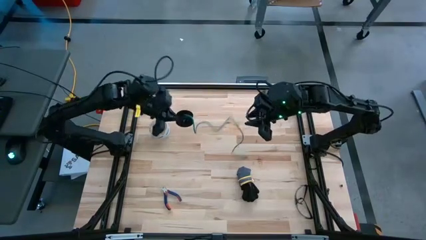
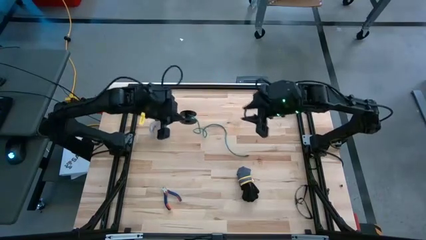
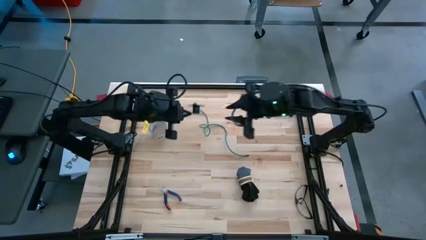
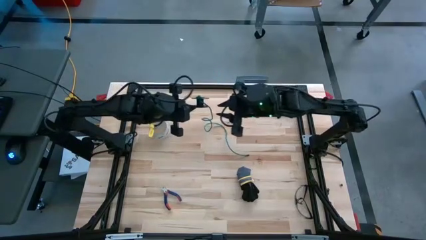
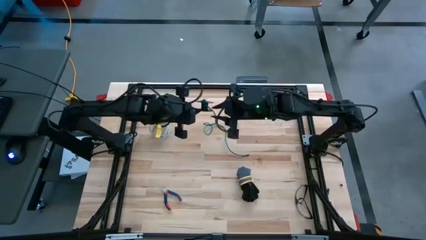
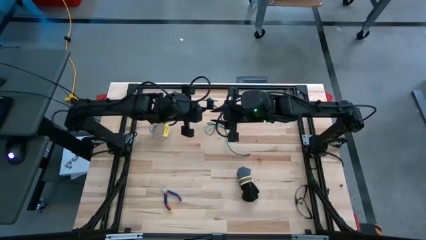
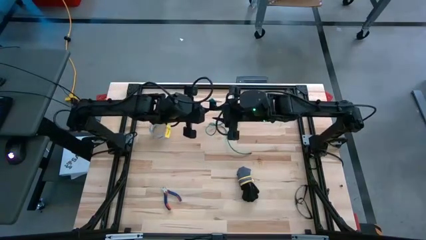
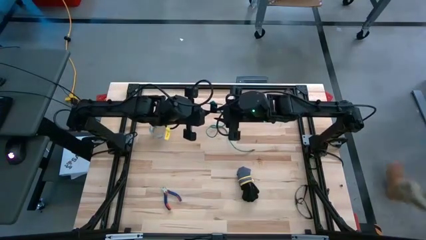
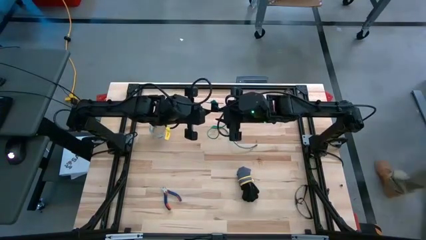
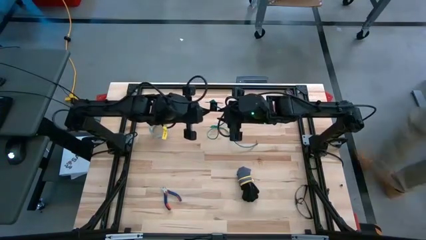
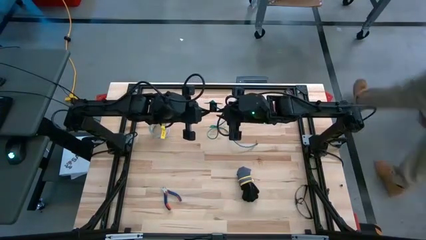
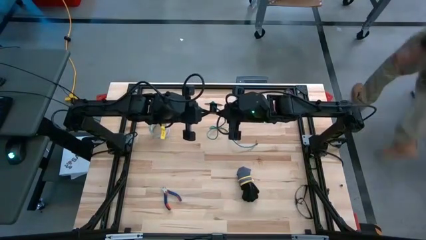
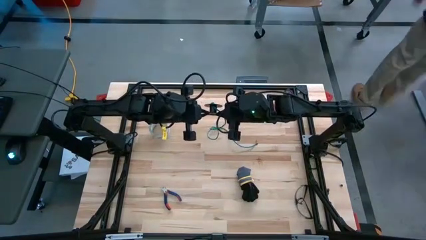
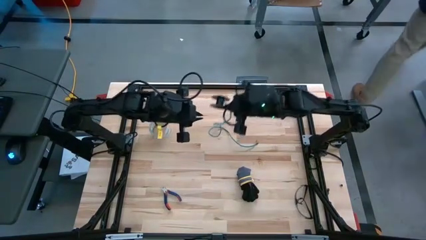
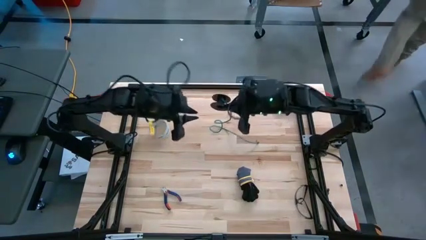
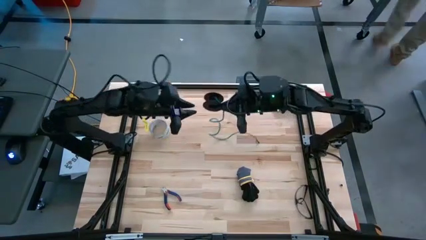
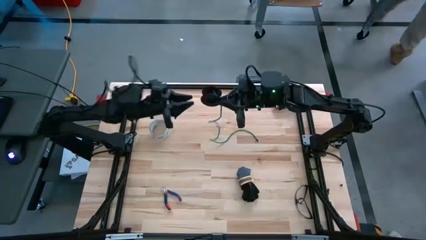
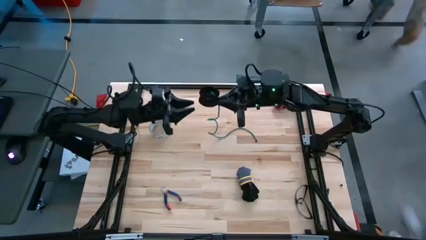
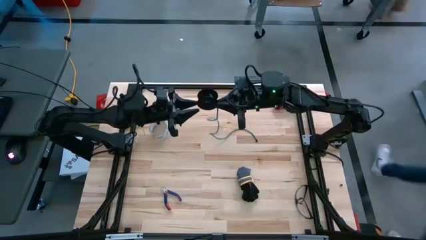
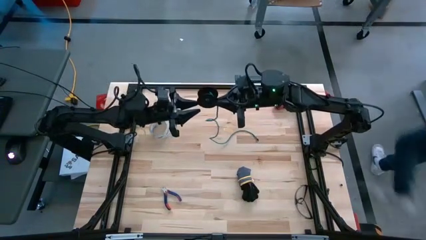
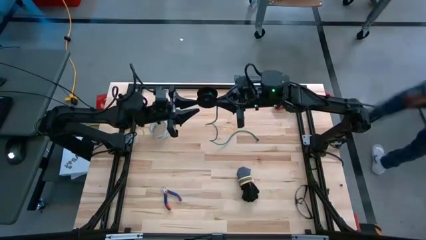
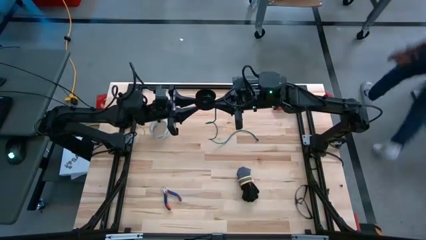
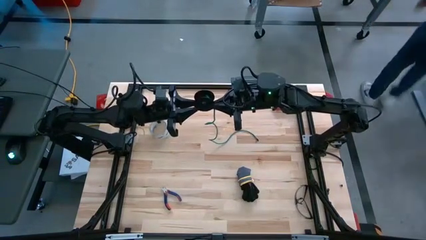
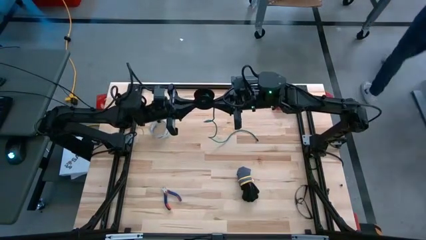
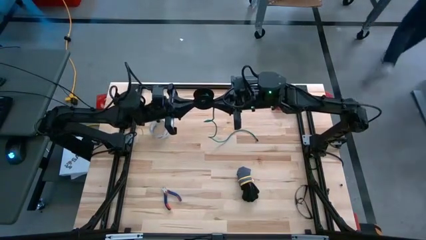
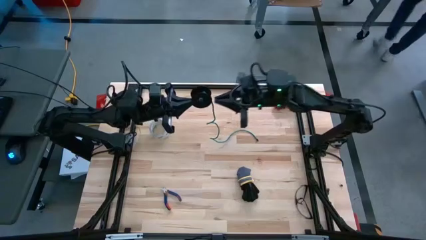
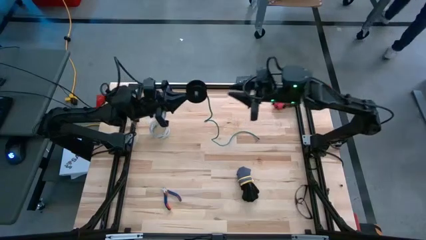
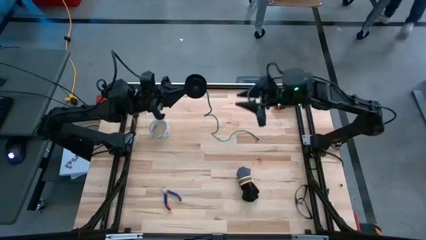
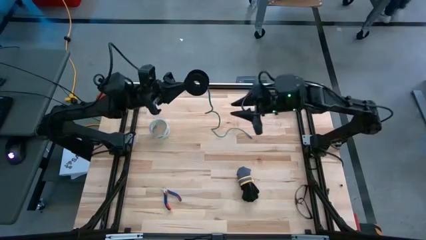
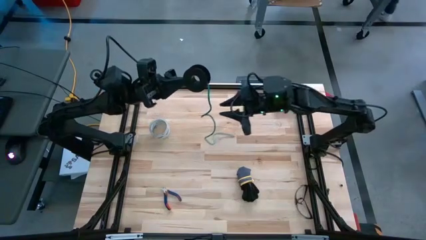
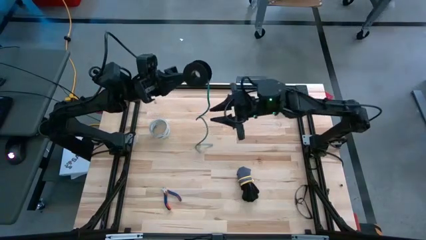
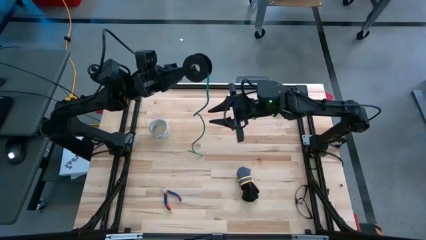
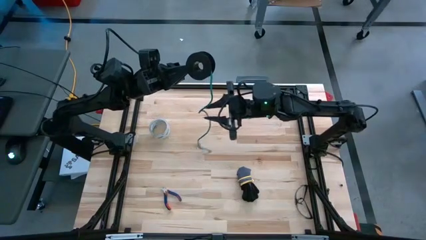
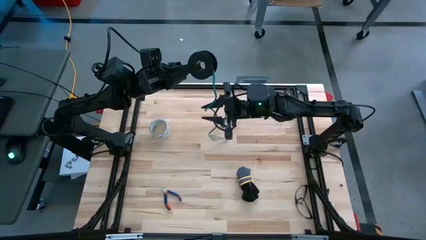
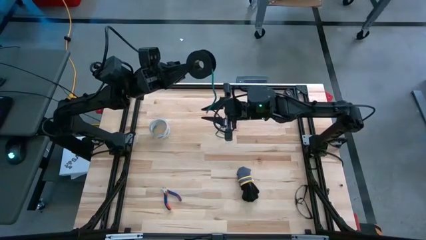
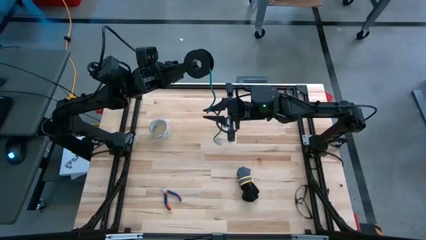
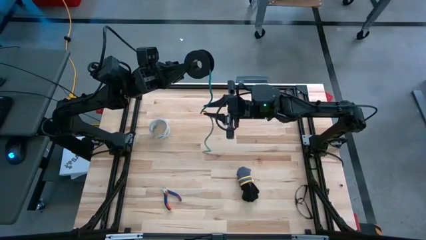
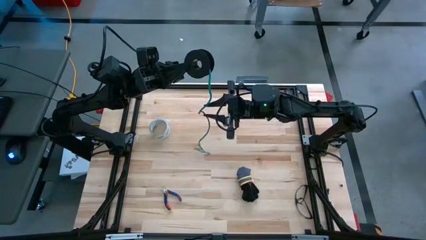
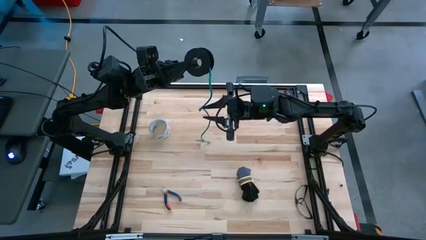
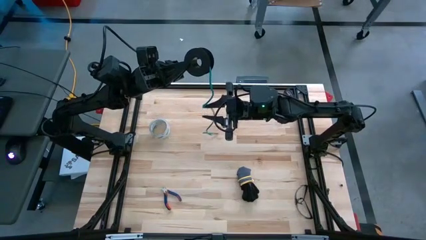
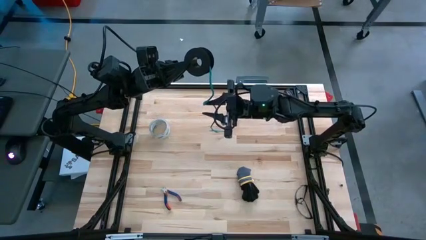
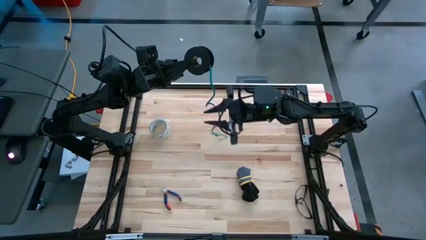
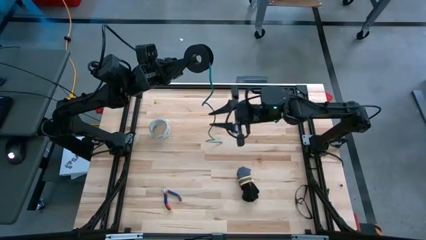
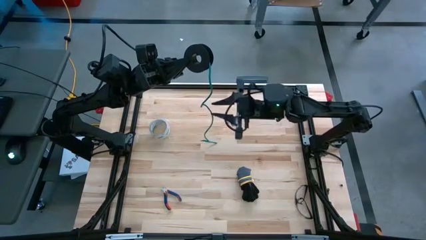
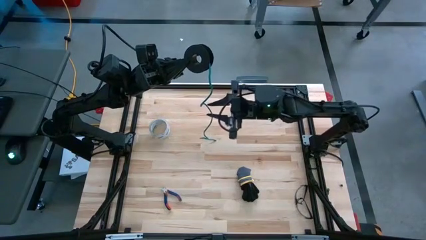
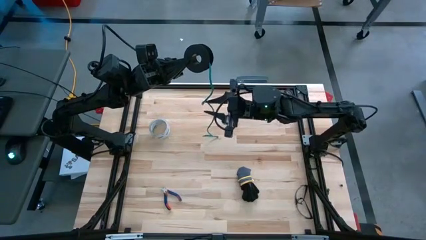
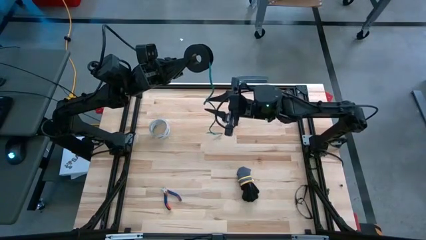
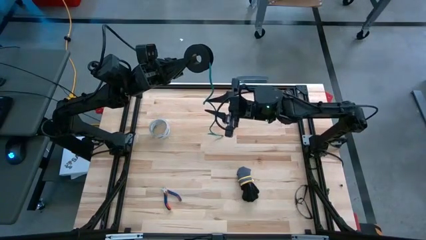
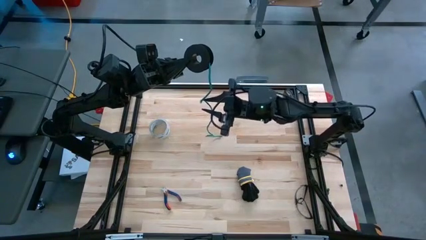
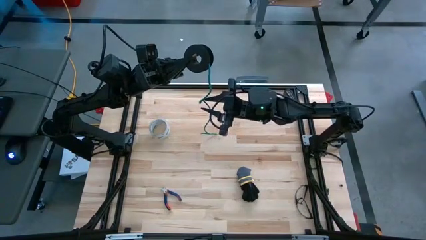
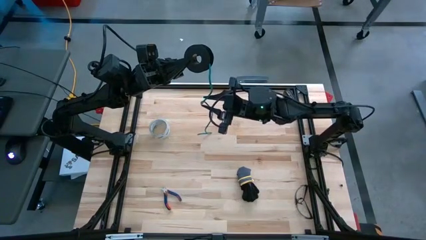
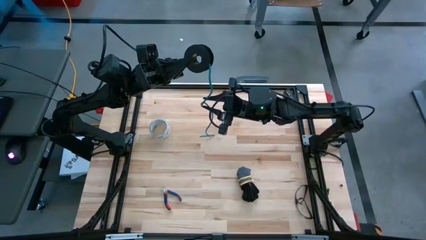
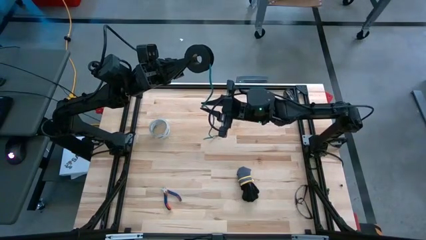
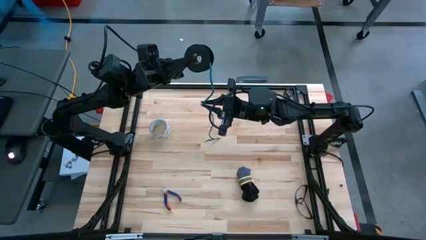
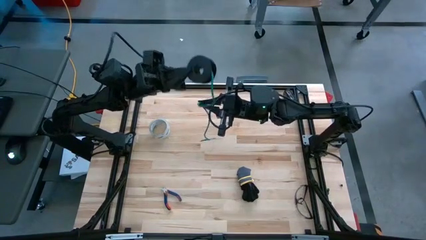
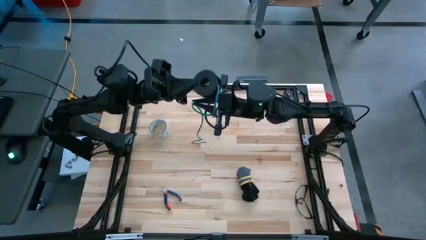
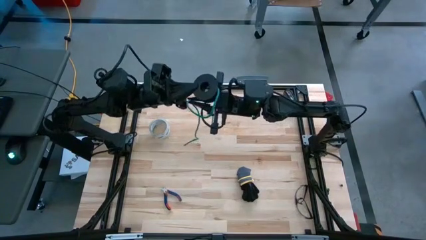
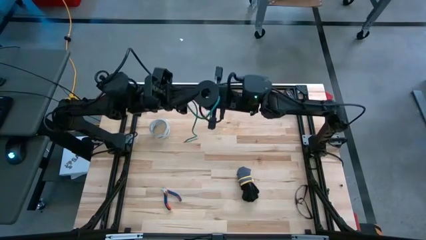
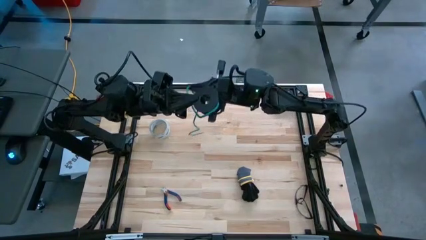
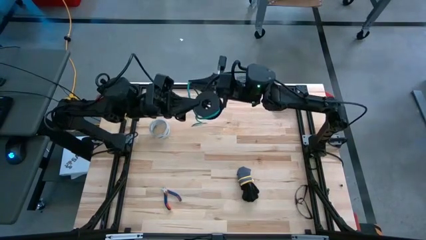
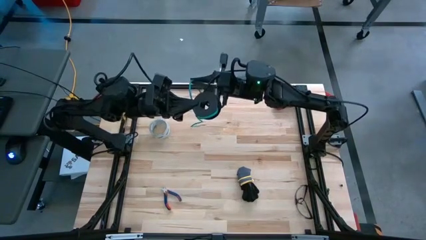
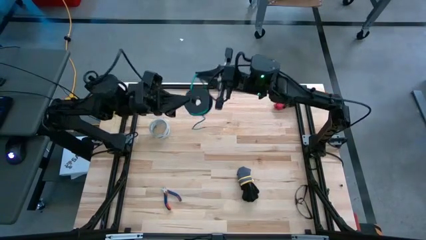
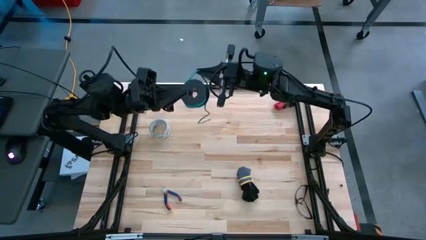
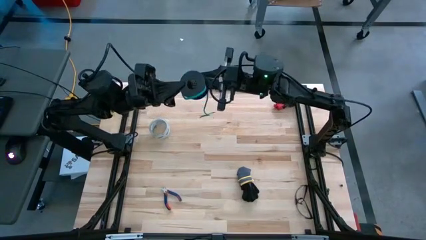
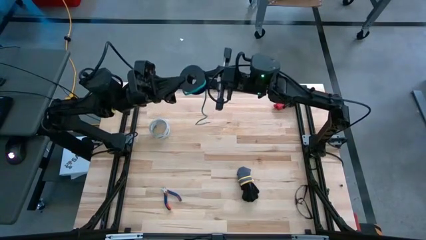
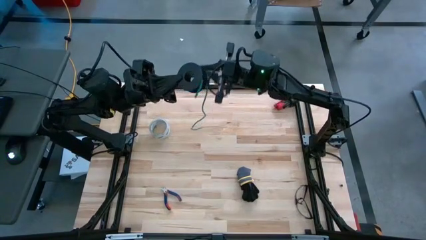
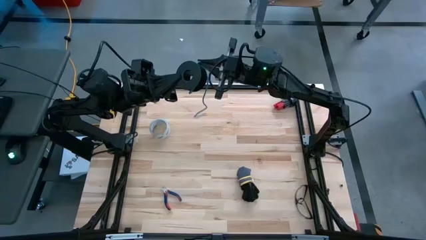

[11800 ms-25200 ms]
Task: Coil cords
Coil the green wire on the spool
